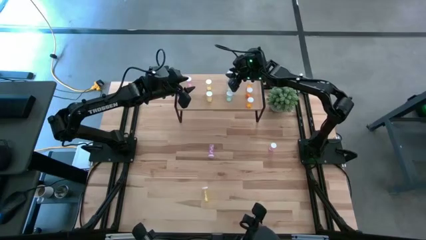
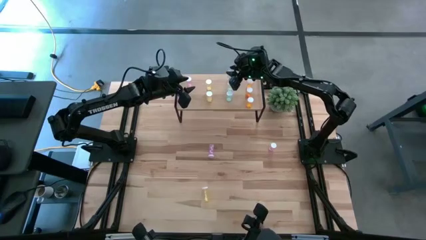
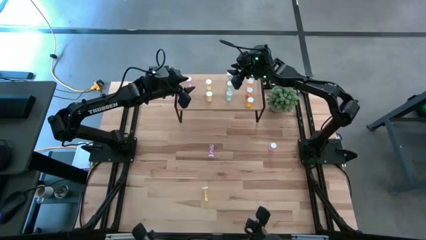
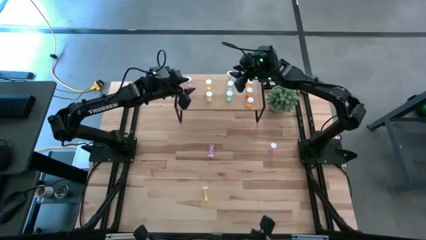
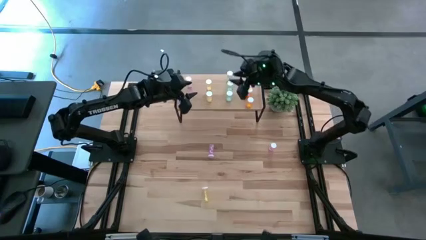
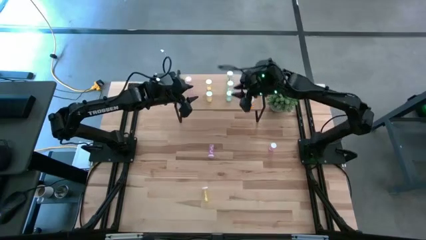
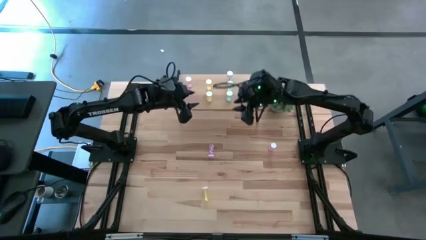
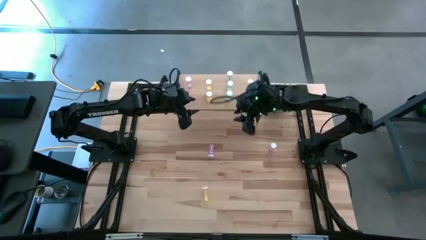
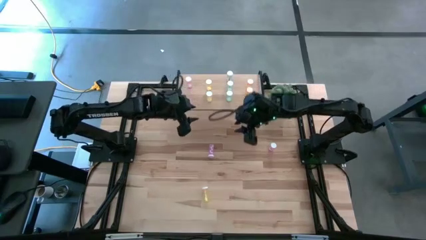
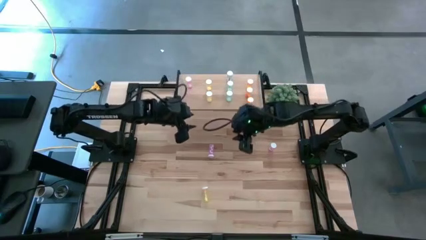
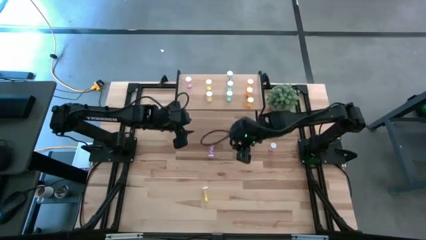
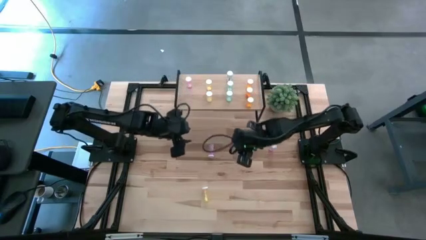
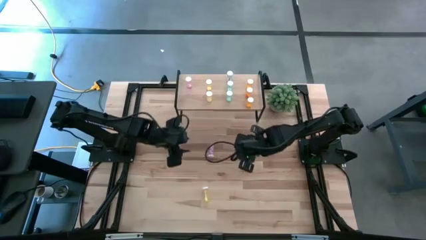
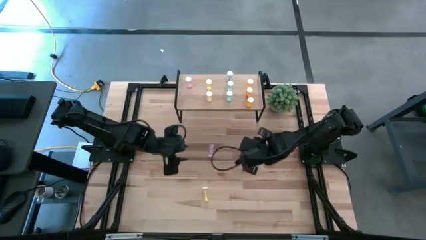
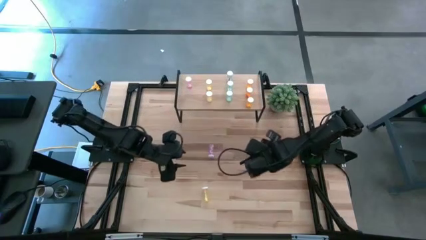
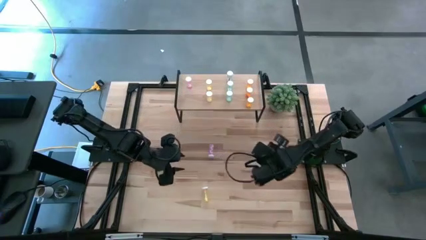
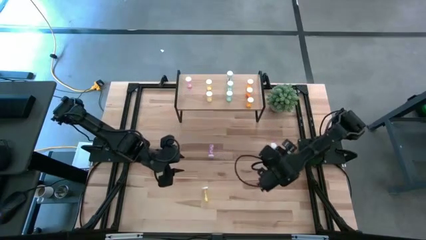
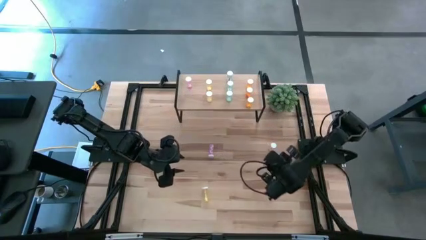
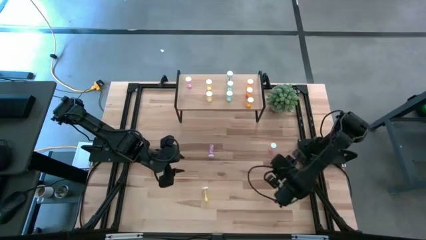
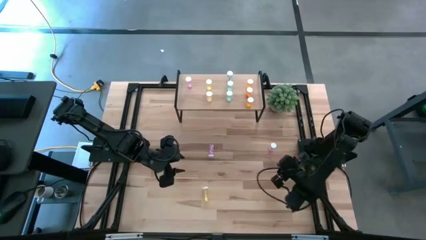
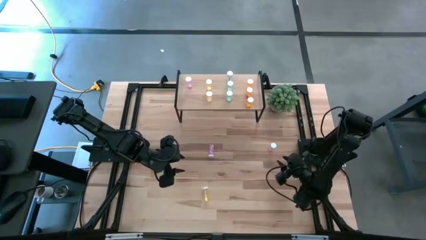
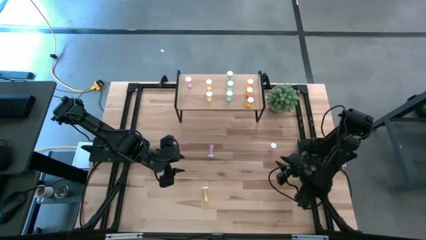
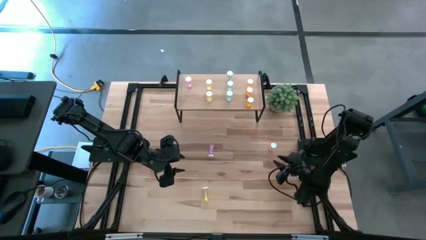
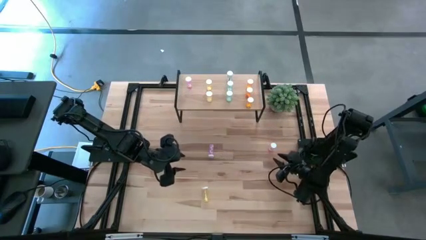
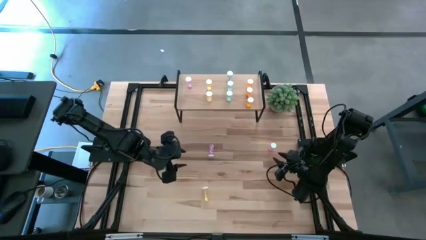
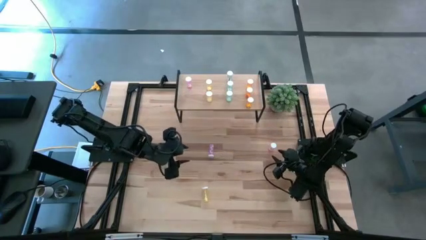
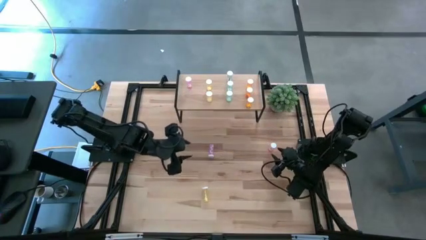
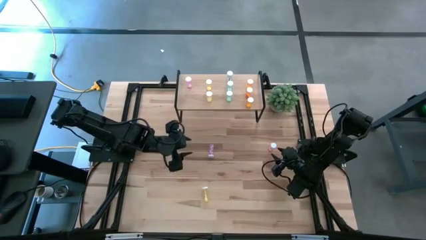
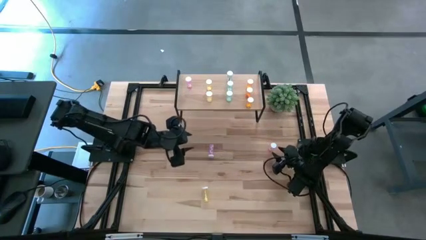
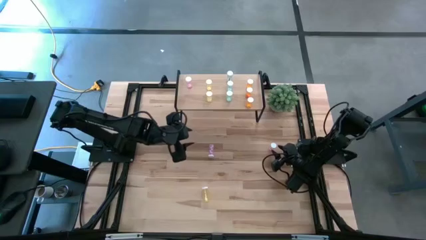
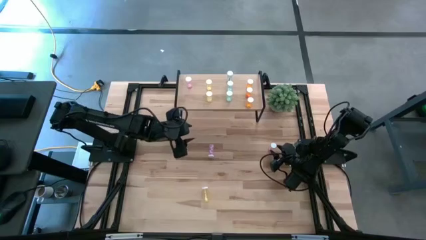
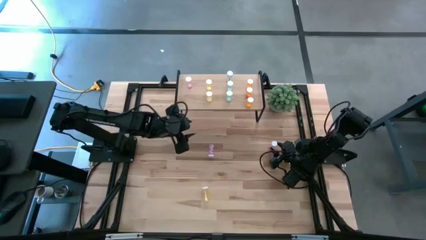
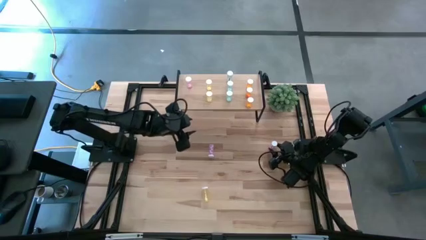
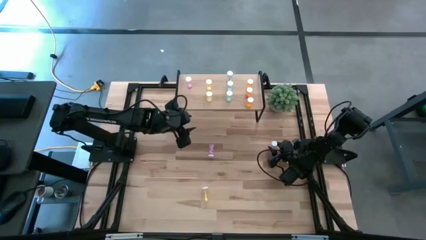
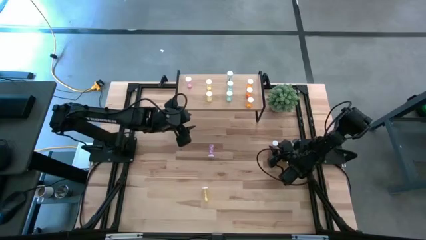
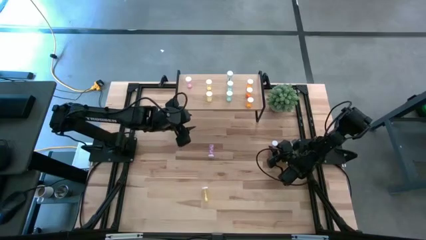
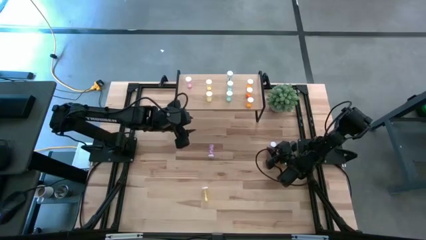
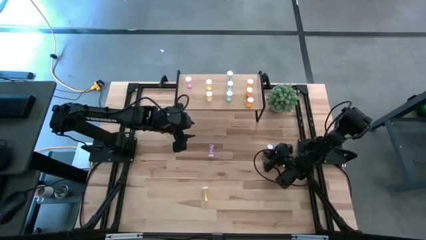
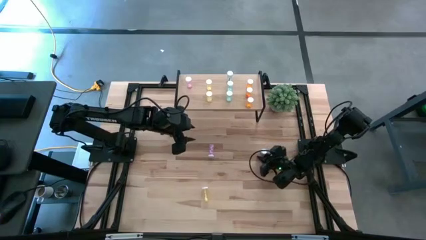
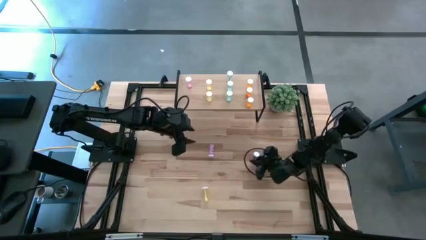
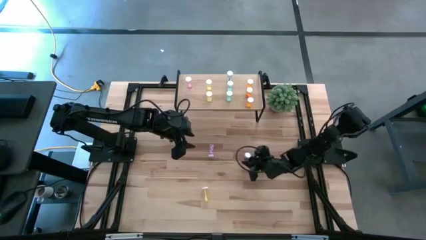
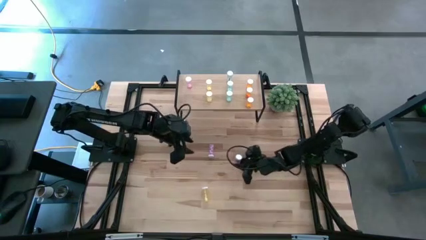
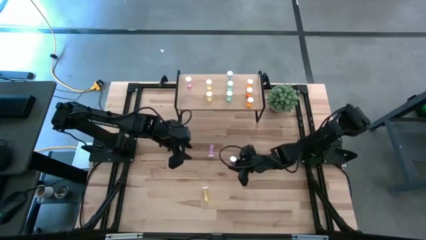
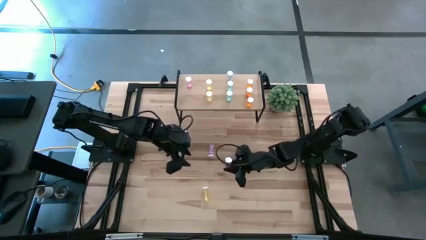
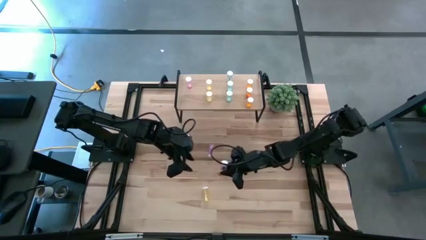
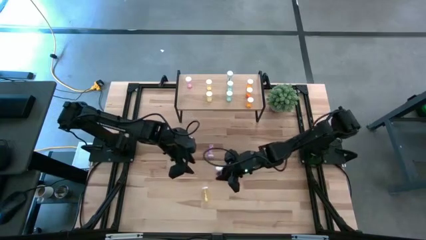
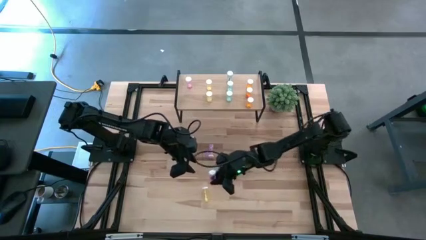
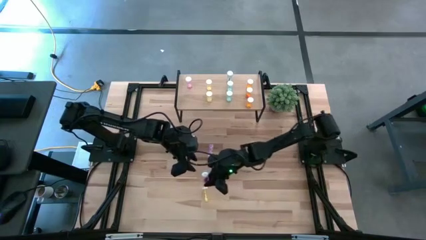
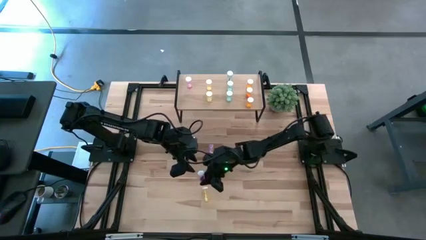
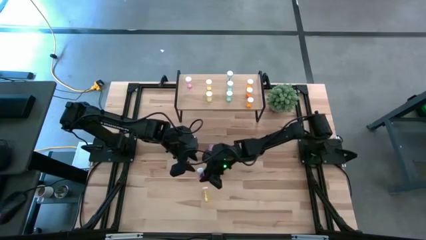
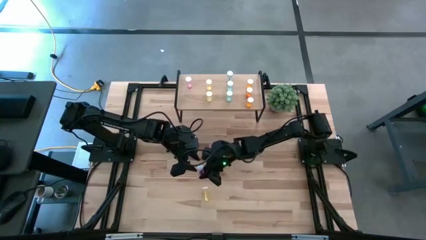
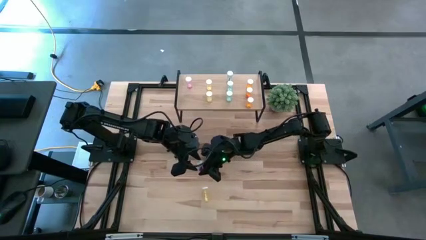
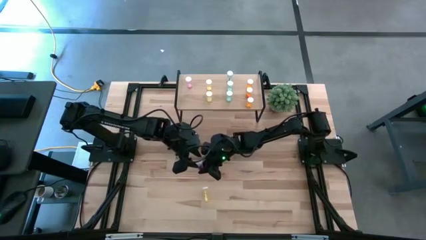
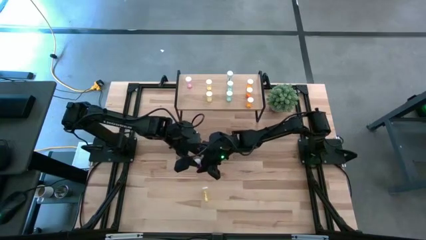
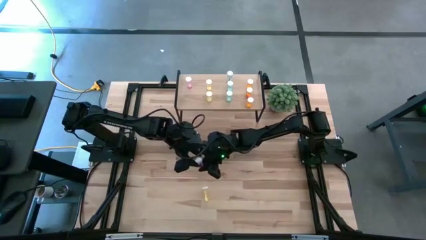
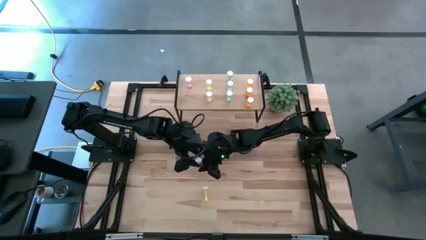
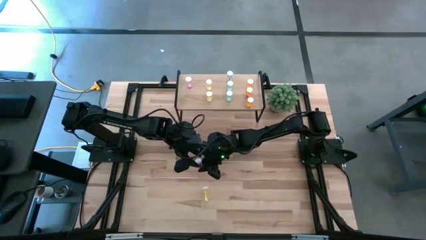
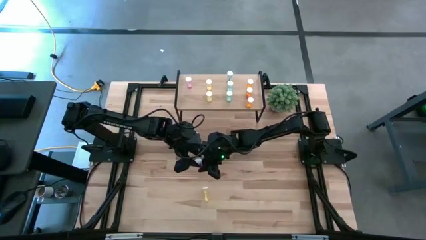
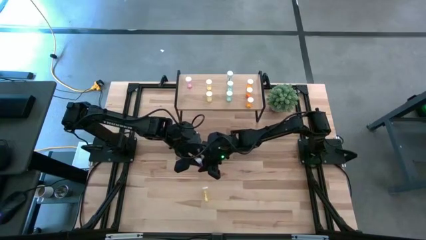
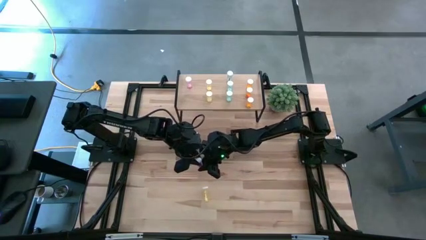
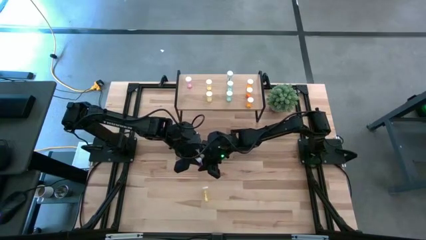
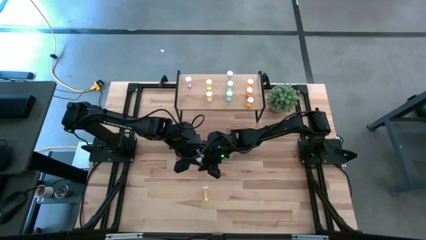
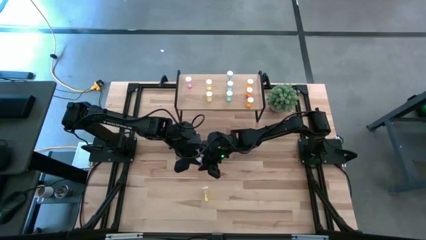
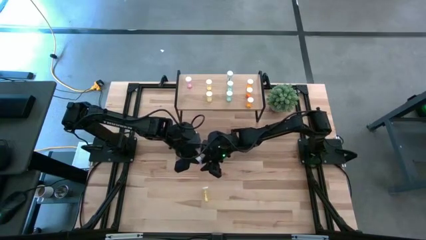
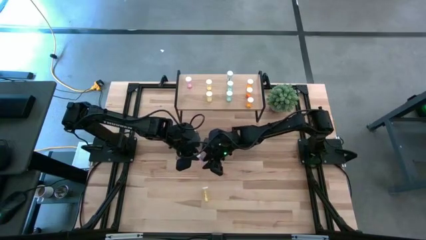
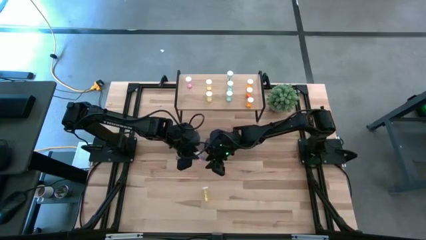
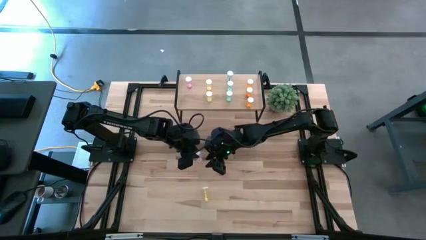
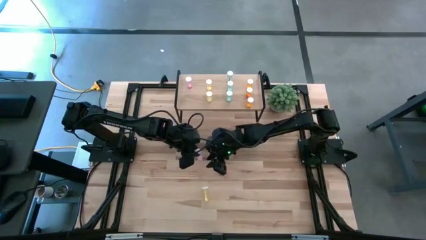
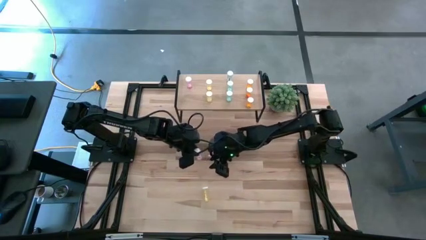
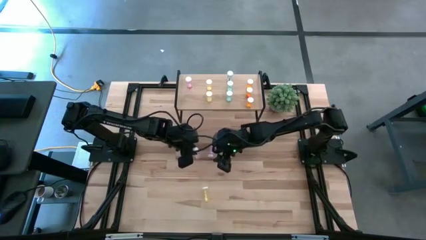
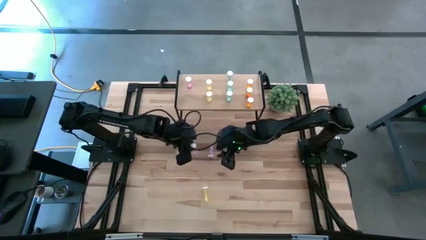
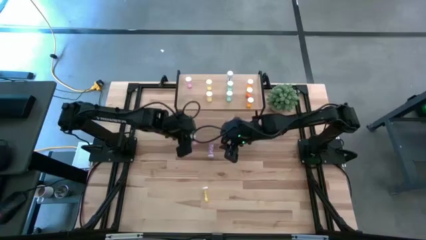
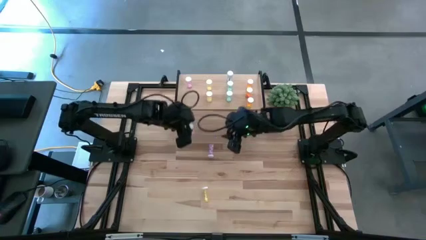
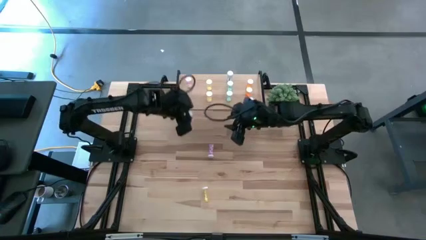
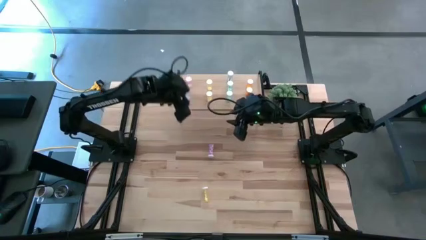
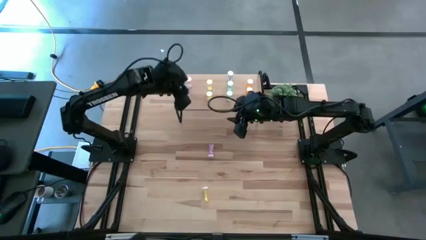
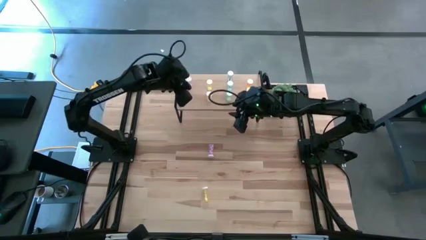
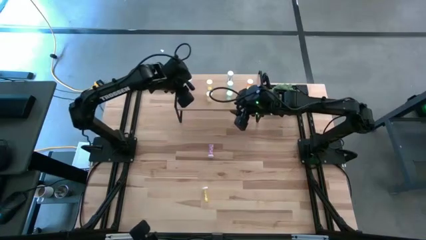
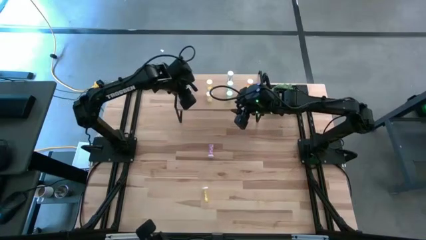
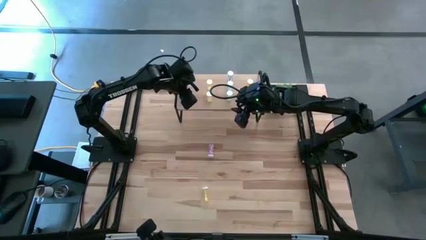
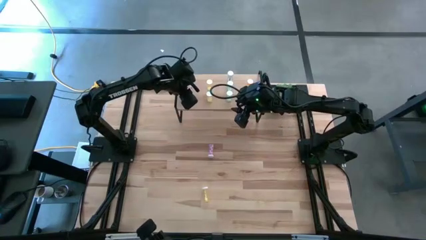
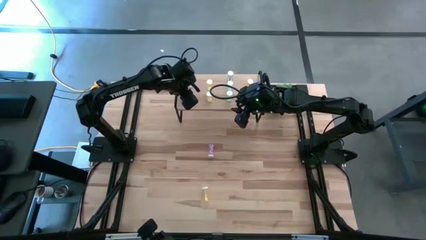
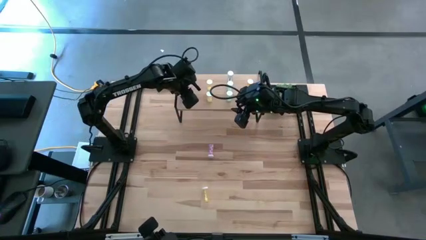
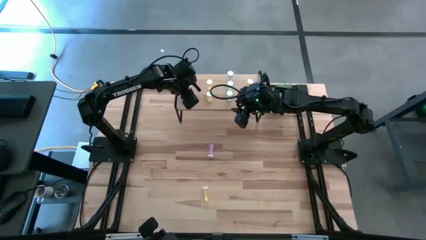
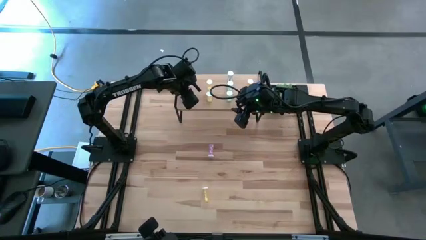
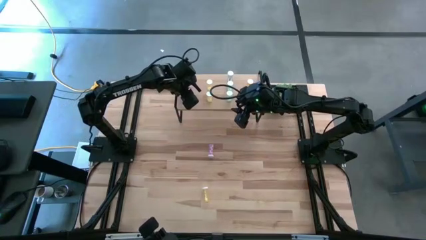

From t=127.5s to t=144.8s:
Task: Pick and place medicine bottles onto shelf by color
Put the right pink pill bottle aligned with the other pink pill bottle on the shelf
